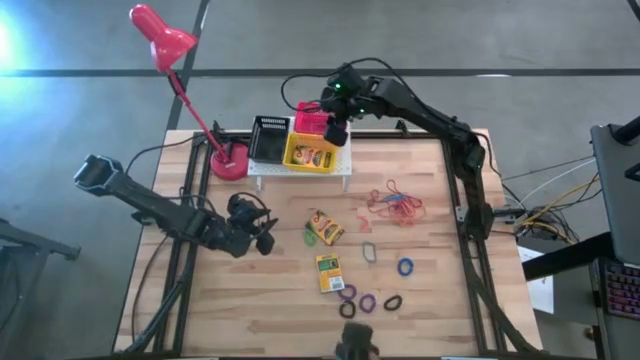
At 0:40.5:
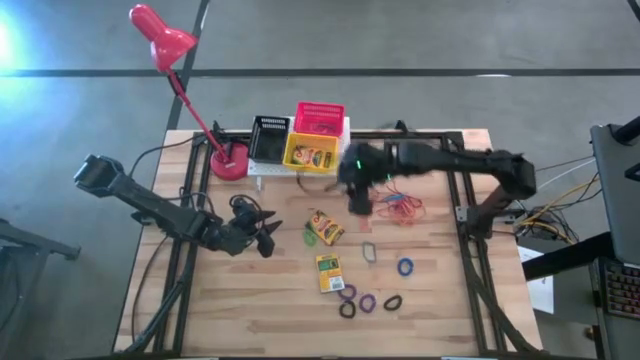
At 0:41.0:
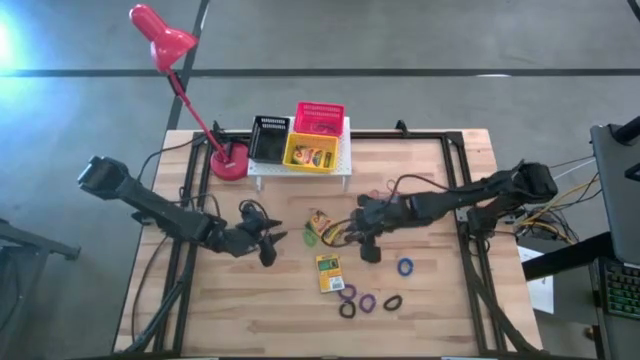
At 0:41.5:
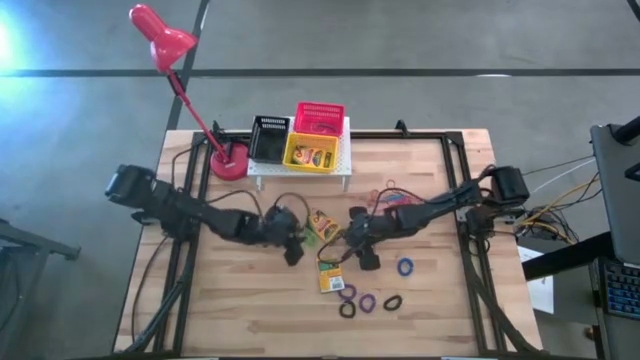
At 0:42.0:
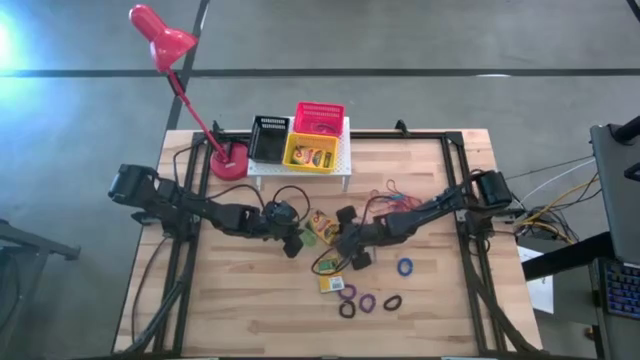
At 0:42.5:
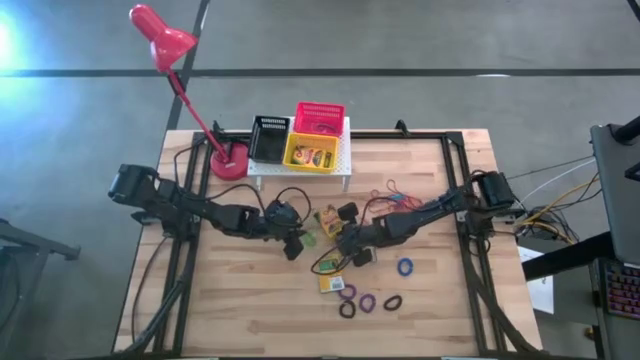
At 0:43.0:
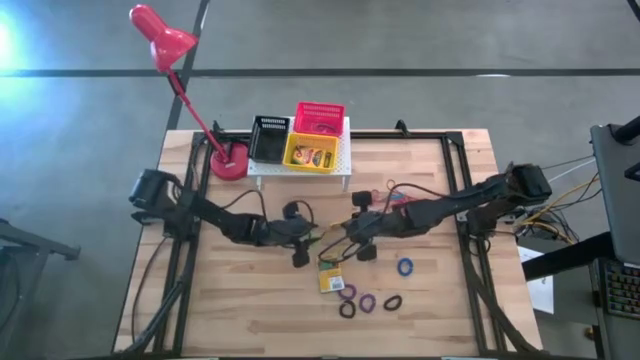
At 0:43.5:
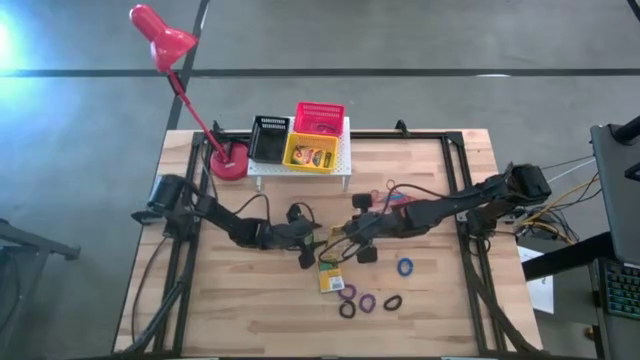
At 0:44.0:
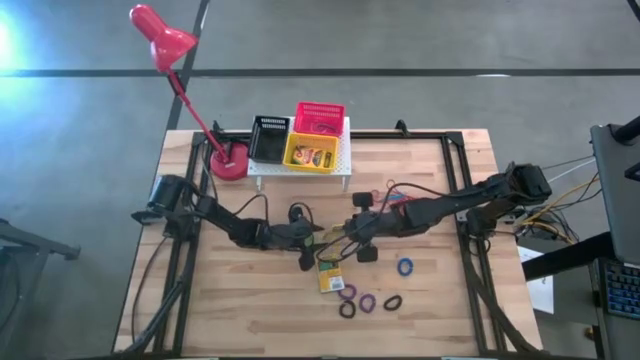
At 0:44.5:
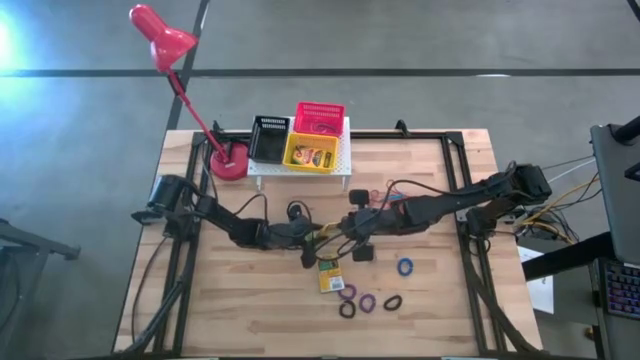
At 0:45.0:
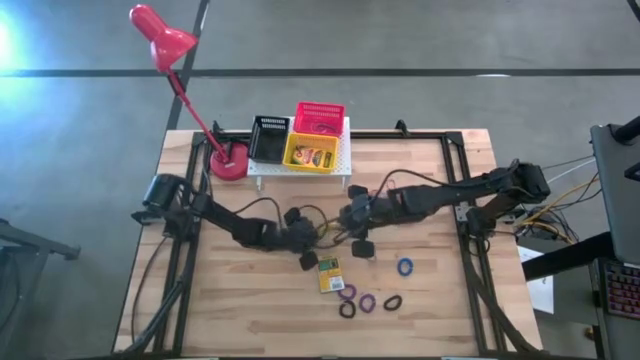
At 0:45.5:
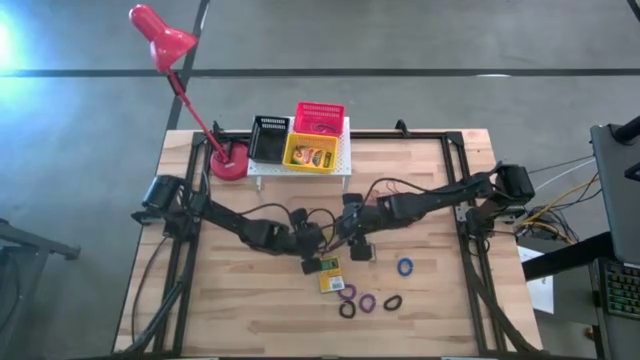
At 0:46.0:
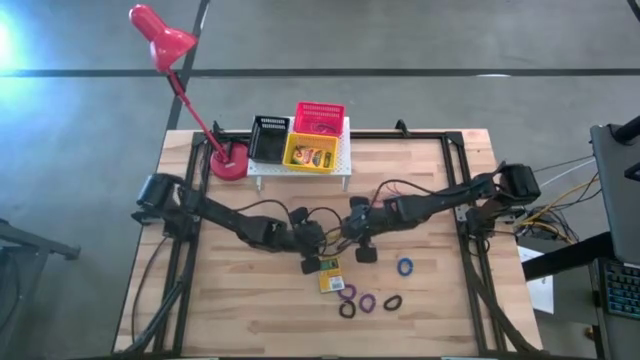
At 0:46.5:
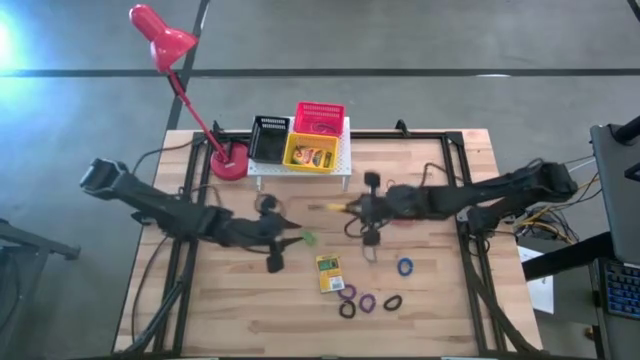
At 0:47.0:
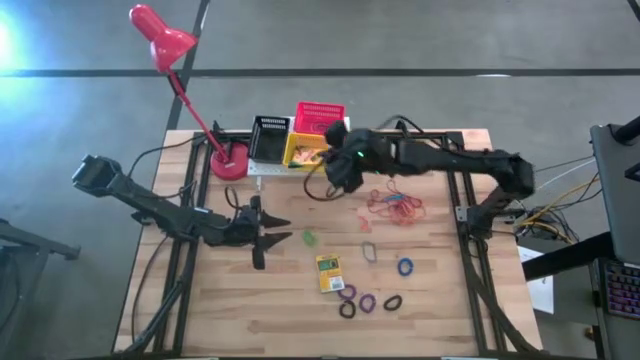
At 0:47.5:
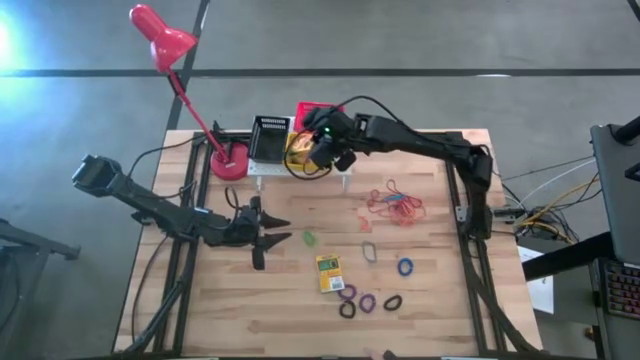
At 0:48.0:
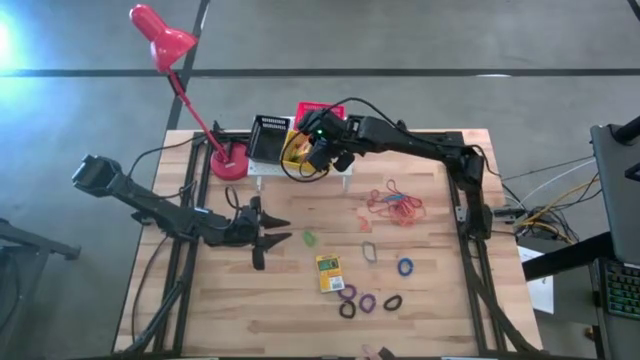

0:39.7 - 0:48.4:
Task: Pick & Place Office Desk Supplies
Put the top yellow crayon box into the yellow bin on the shelf

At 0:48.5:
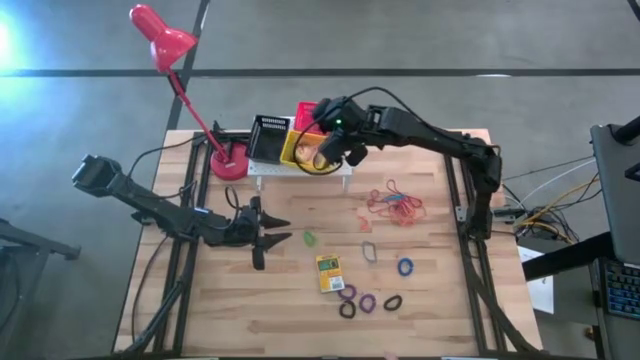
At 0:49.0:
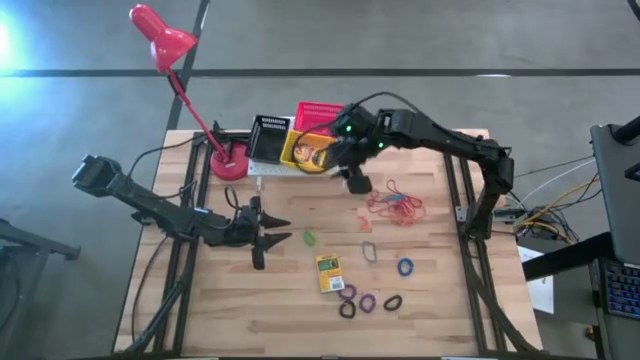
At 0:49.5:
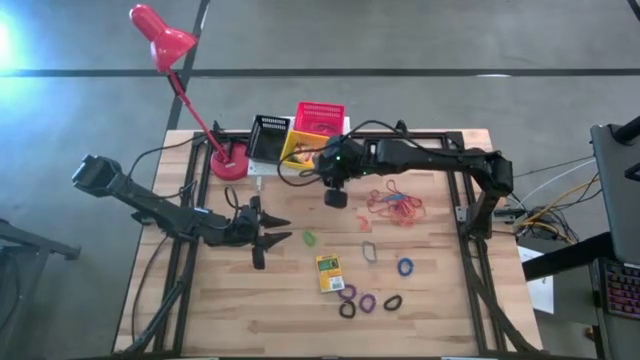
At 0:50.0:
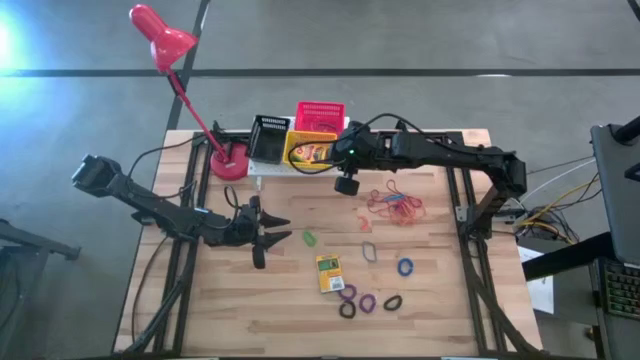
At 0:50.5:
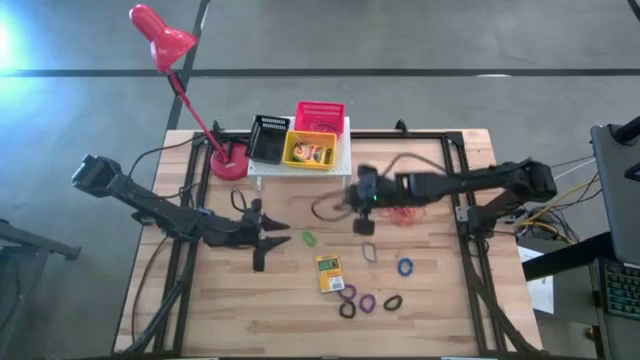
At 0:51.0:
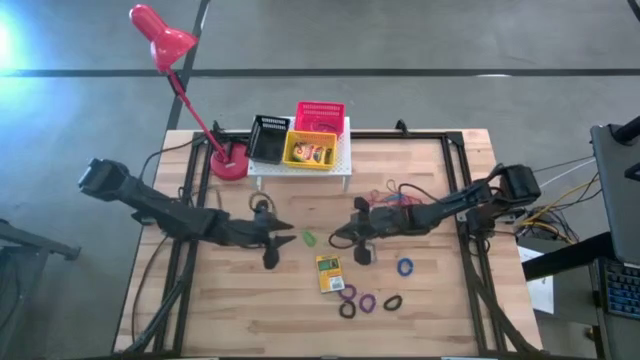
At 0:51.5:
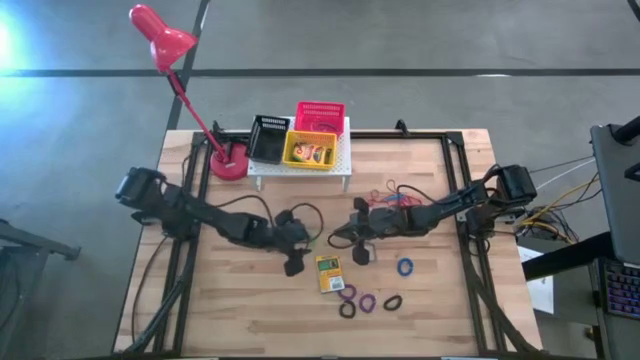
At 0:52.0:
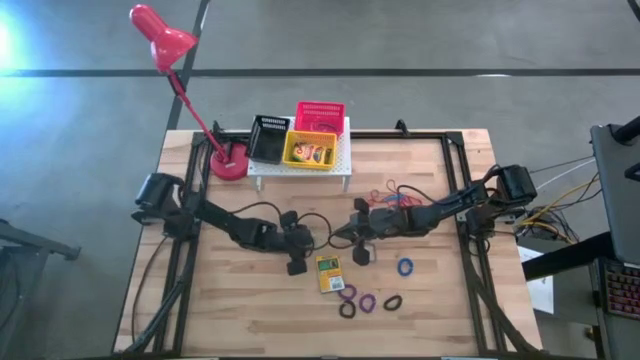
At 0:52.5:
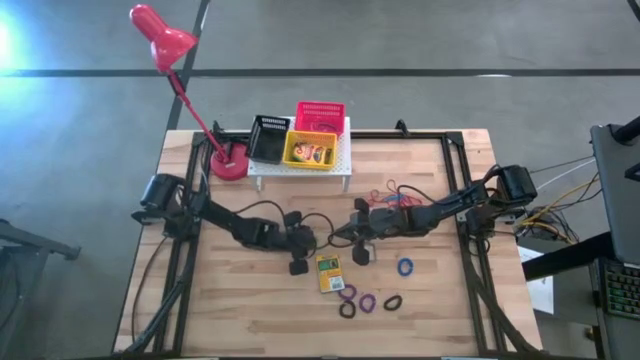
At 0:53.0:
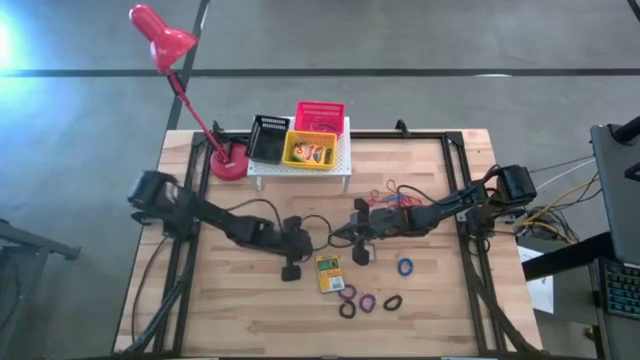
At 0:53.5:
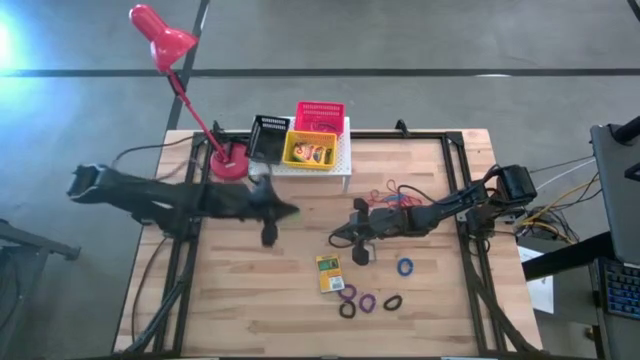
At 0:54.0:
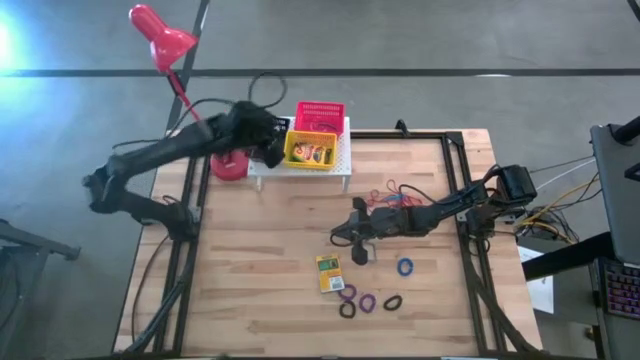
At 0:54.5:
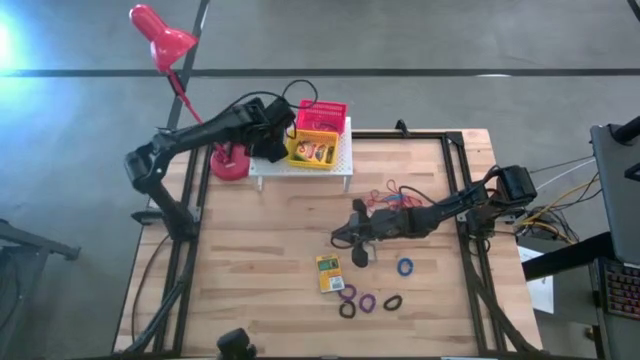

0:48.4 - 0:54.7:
Put the green spring keychain into the black bin on the shelf

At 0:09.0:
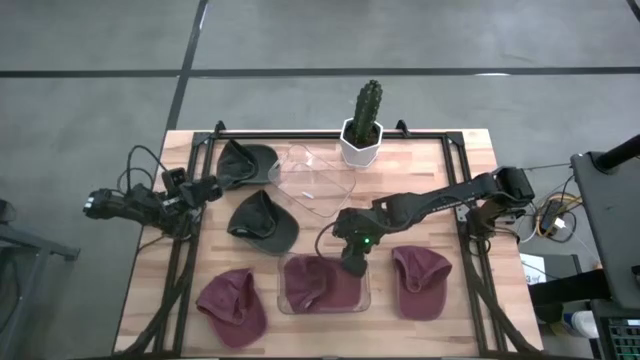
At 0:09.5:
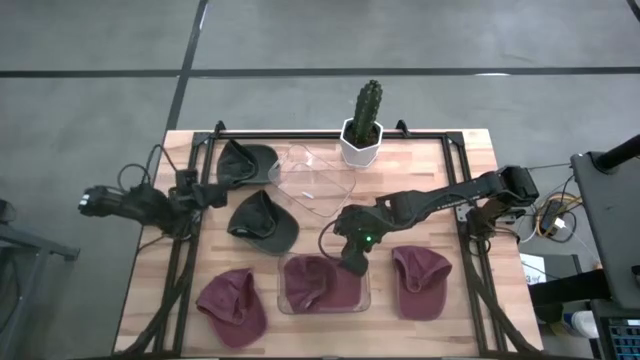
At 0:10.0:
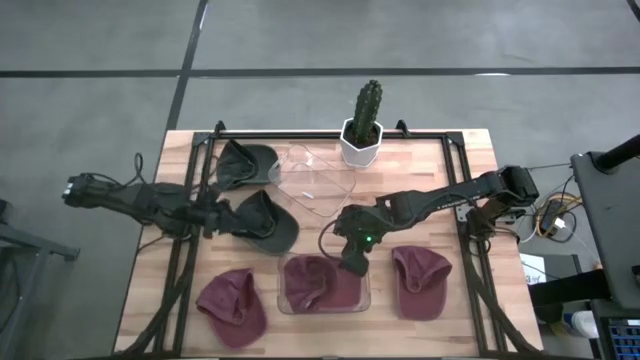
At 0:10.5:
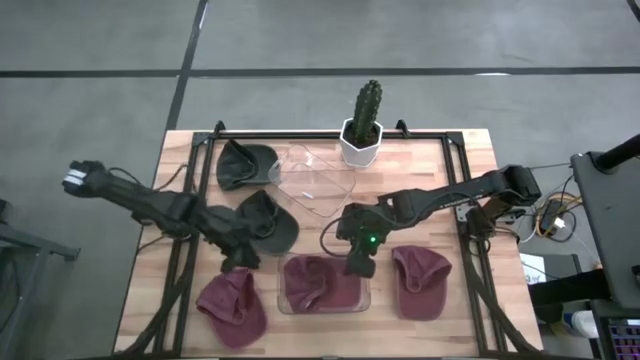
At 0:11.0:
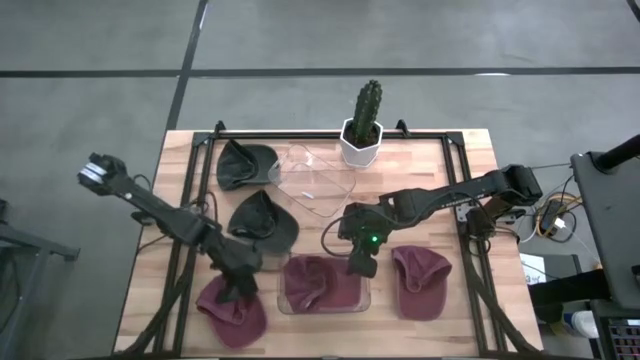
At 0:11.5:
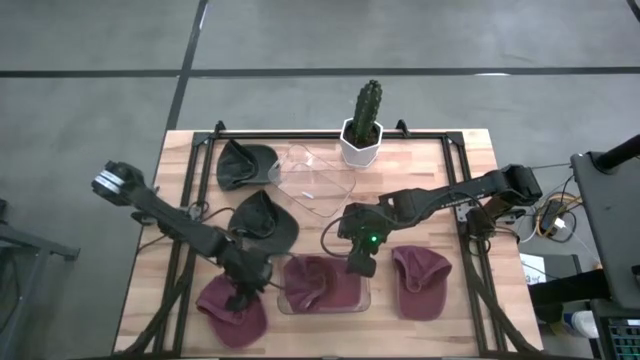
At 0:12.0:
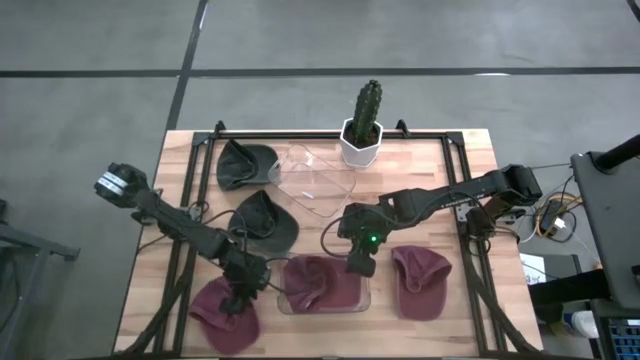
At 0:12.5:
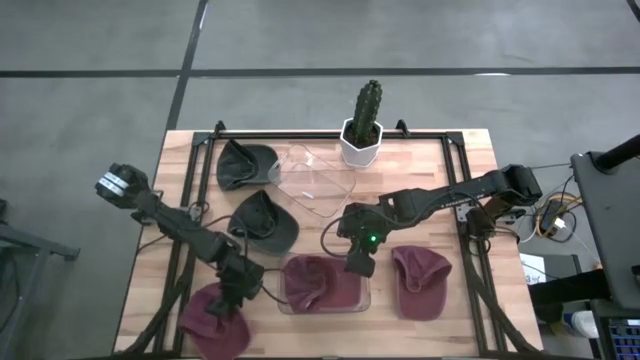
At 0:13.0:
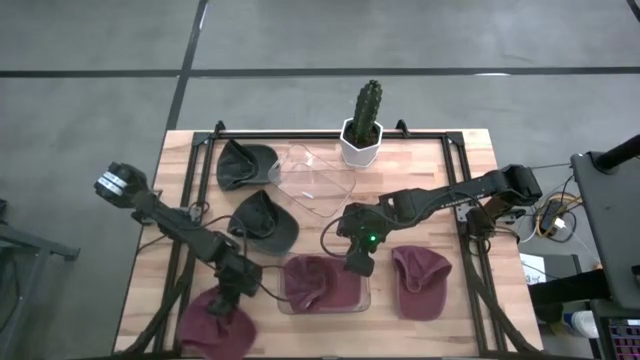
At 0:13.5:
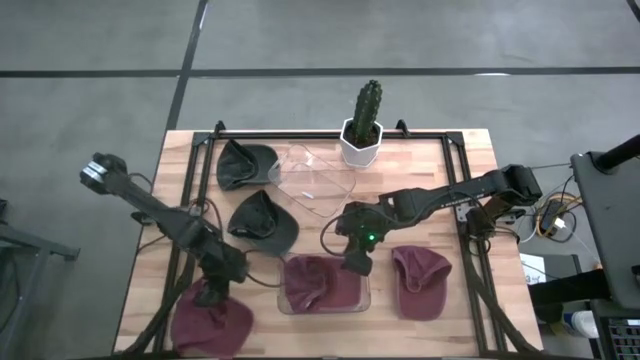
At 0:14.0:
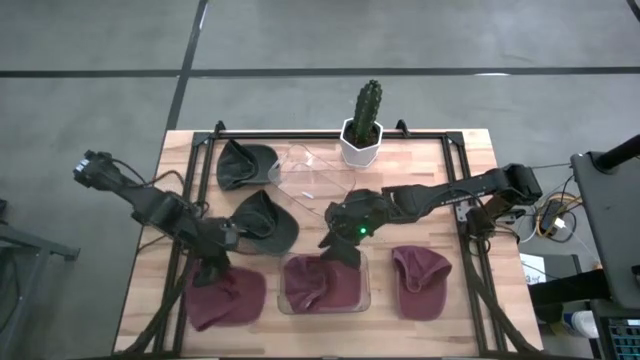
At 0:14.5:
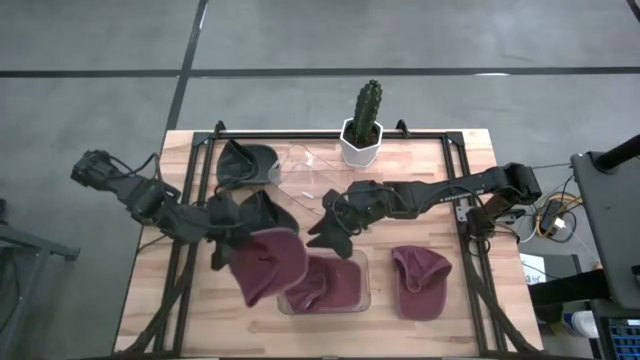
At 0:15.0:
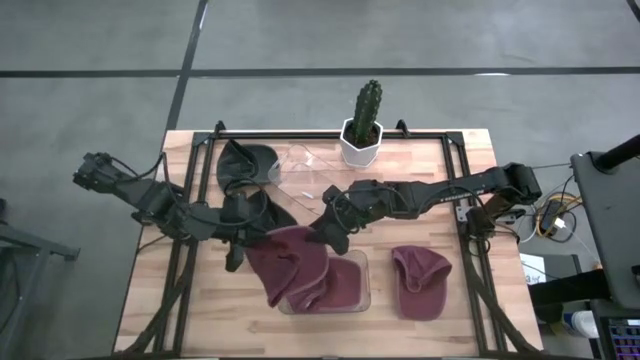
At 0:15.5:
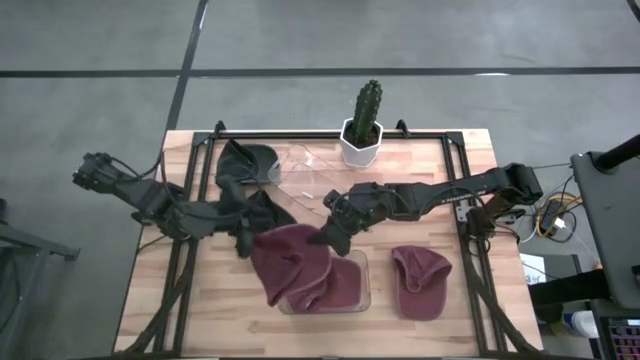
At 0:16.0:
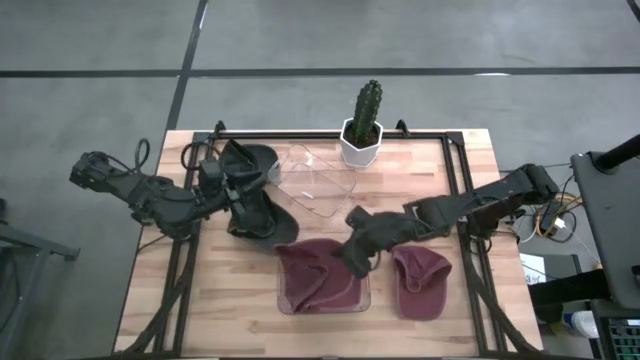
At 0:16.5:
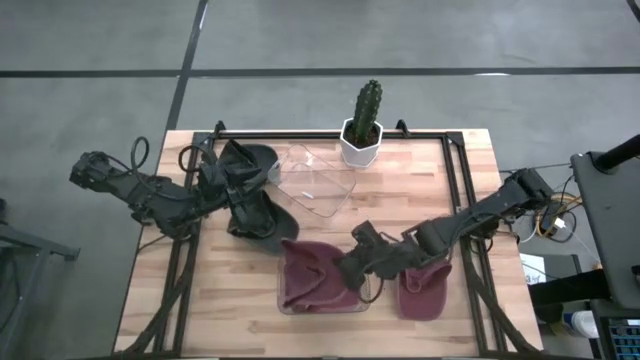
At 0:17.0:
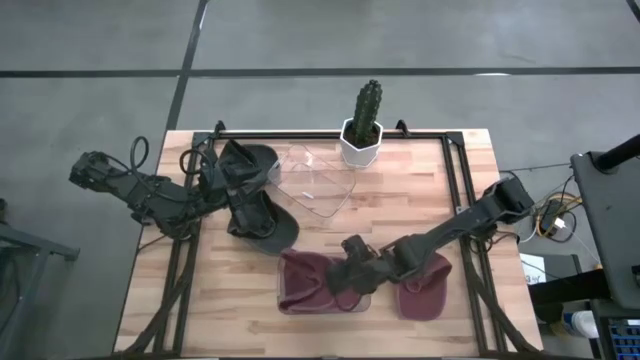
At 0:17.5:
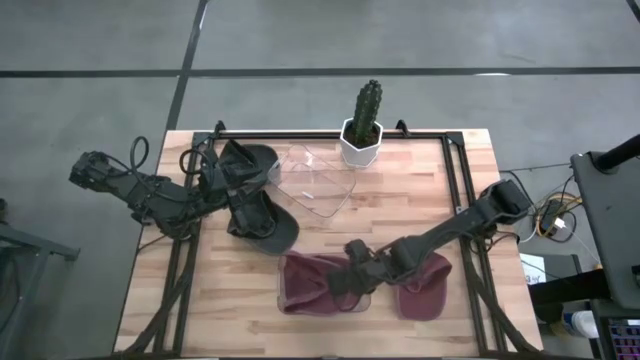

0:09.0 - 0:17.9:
Task: Pick & Place hat
Put the left red cap into the bottom transparent bin
